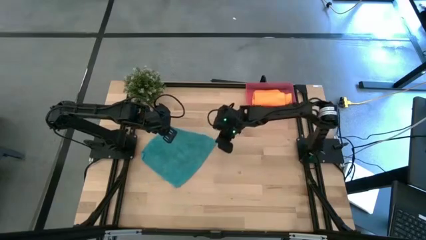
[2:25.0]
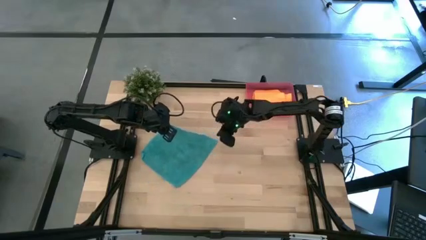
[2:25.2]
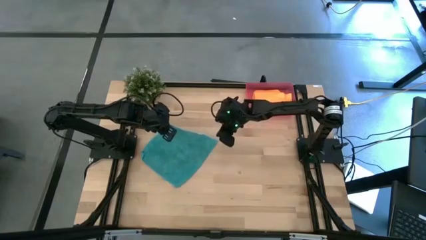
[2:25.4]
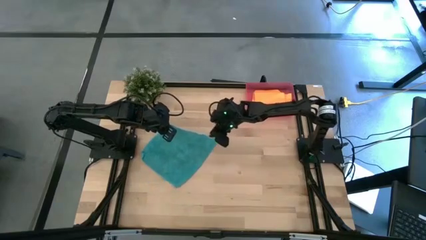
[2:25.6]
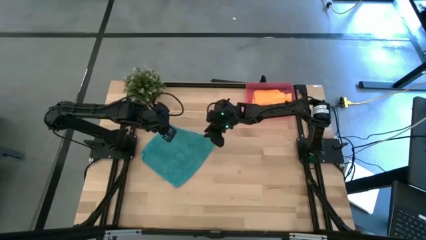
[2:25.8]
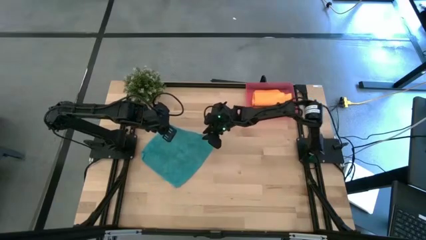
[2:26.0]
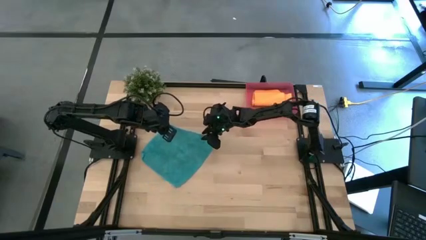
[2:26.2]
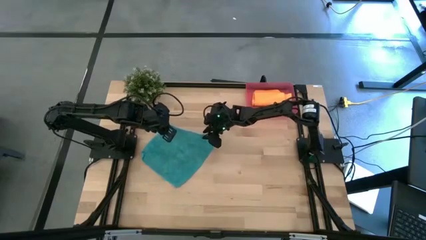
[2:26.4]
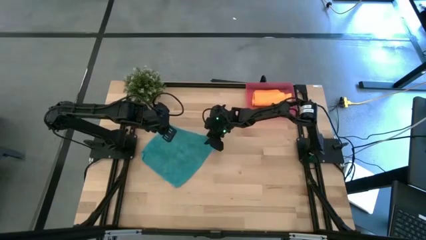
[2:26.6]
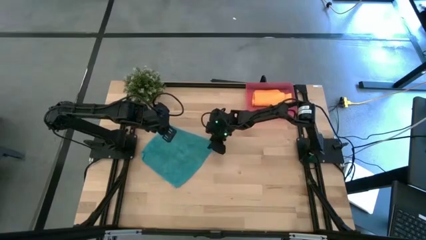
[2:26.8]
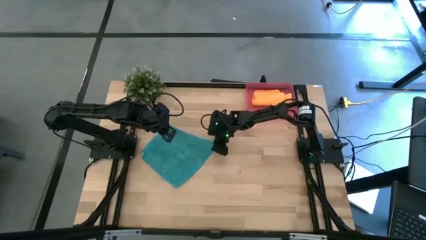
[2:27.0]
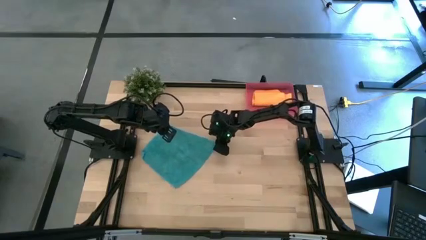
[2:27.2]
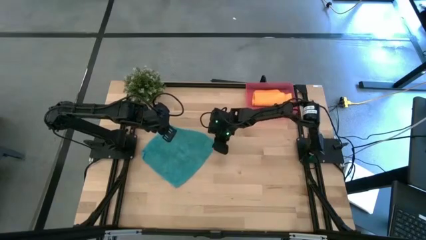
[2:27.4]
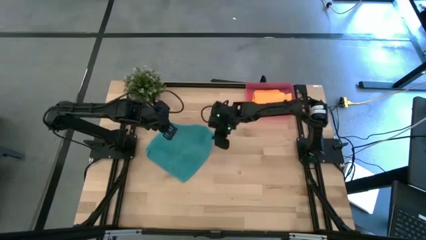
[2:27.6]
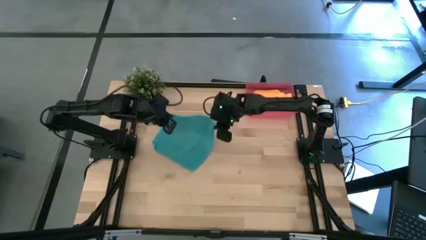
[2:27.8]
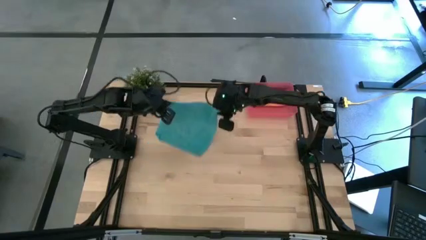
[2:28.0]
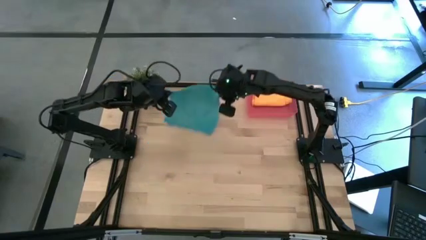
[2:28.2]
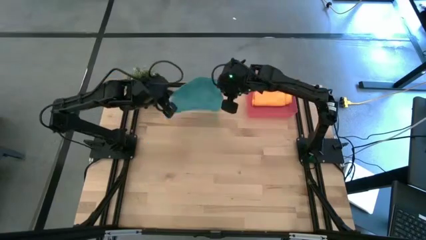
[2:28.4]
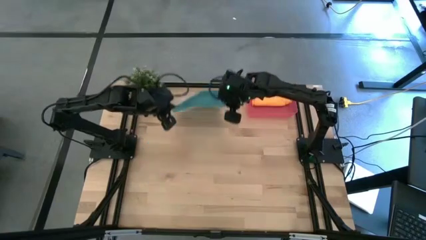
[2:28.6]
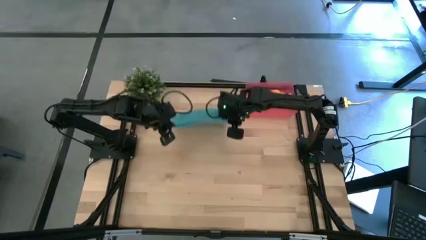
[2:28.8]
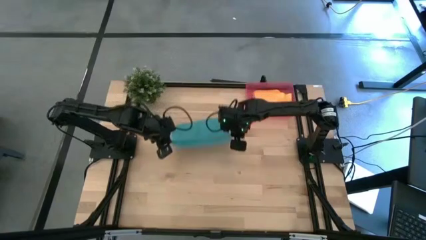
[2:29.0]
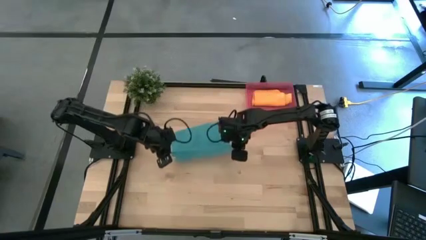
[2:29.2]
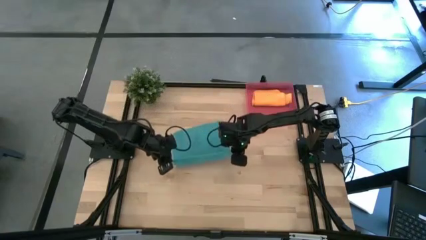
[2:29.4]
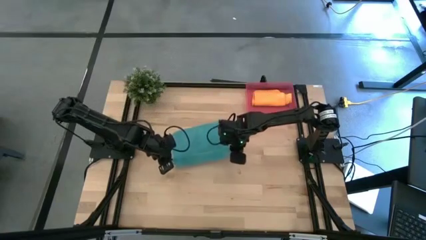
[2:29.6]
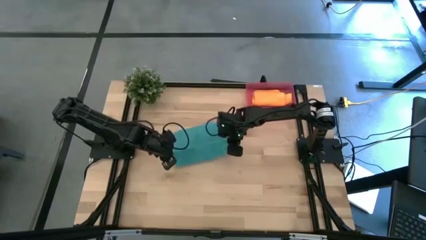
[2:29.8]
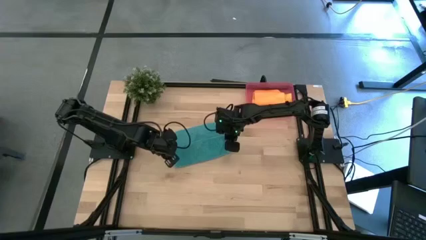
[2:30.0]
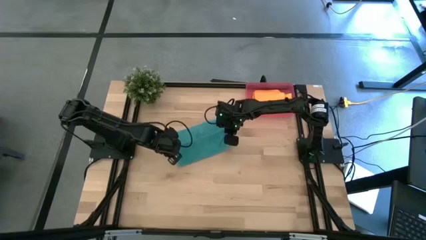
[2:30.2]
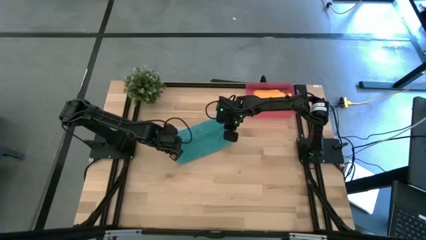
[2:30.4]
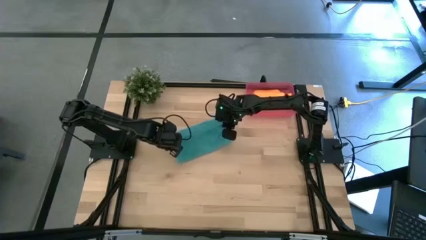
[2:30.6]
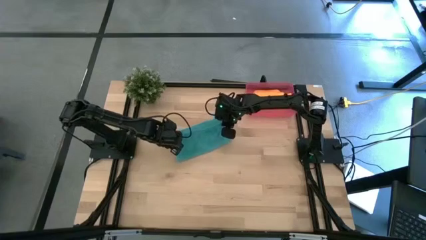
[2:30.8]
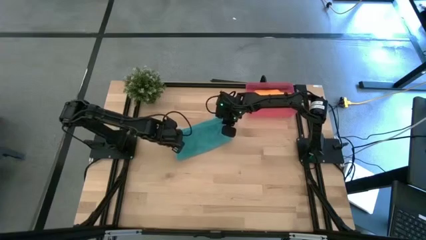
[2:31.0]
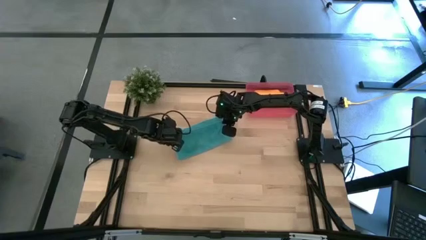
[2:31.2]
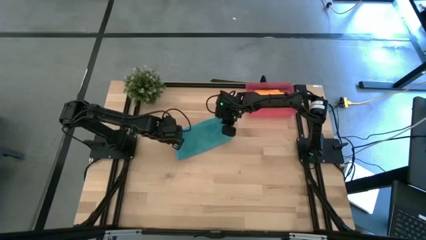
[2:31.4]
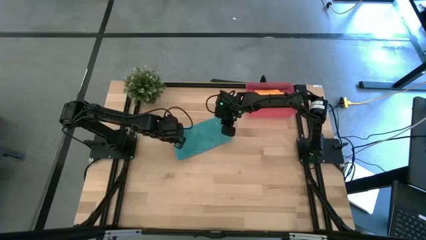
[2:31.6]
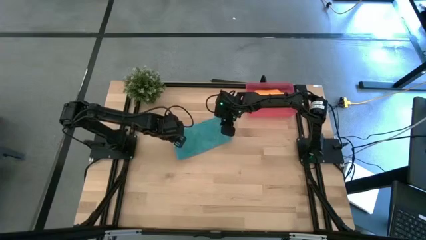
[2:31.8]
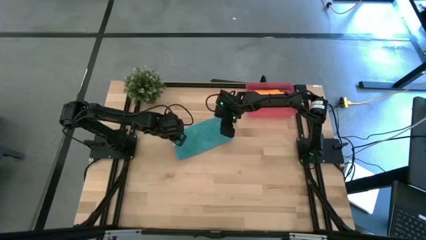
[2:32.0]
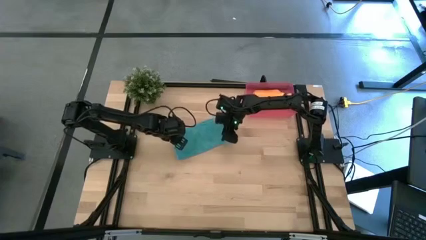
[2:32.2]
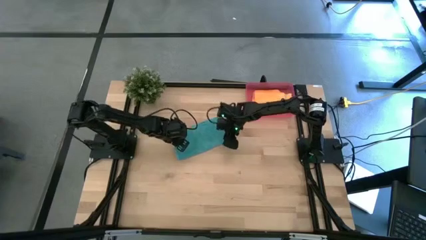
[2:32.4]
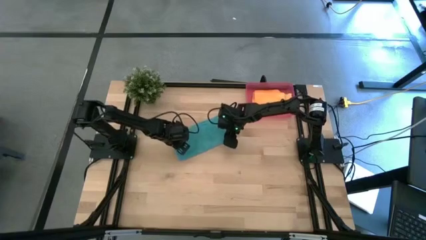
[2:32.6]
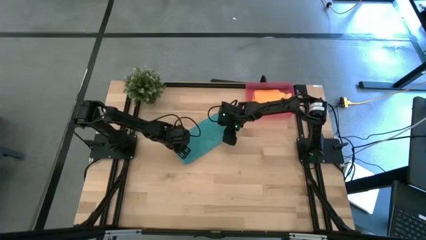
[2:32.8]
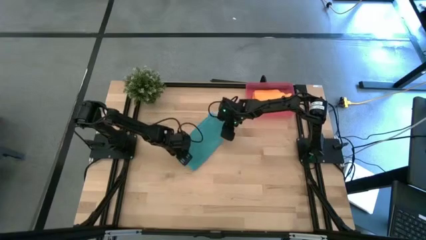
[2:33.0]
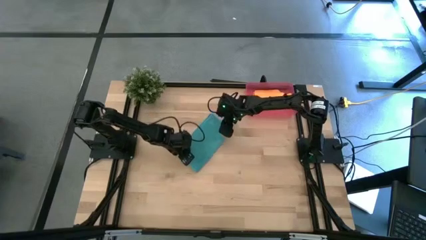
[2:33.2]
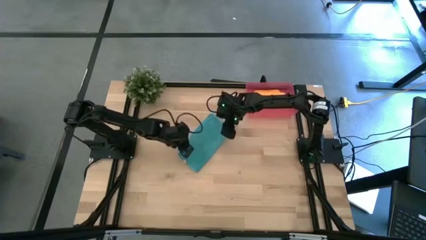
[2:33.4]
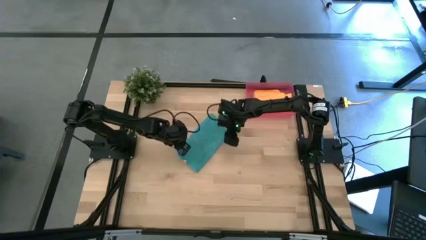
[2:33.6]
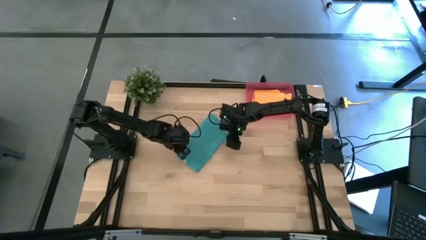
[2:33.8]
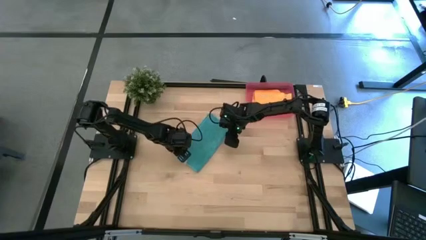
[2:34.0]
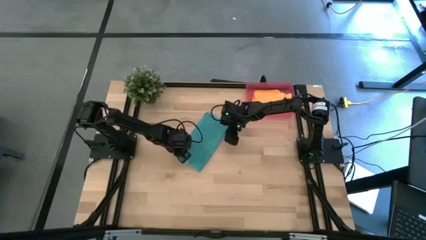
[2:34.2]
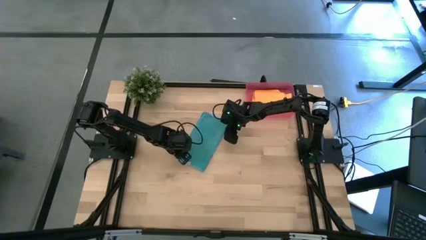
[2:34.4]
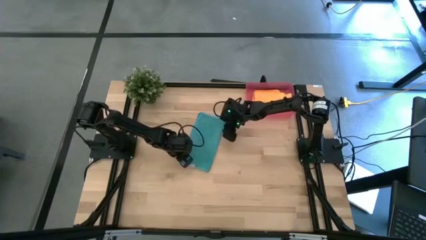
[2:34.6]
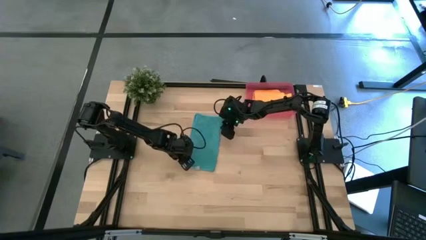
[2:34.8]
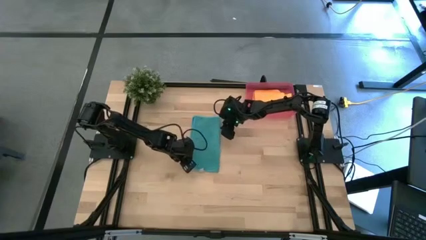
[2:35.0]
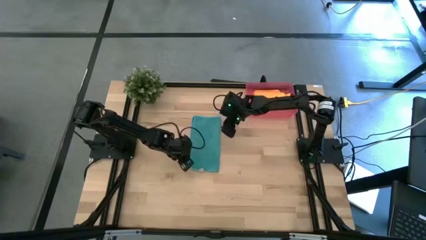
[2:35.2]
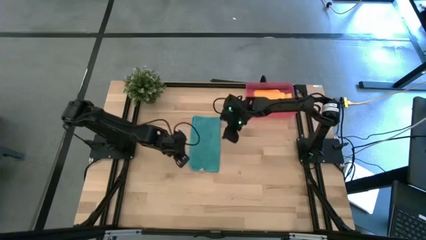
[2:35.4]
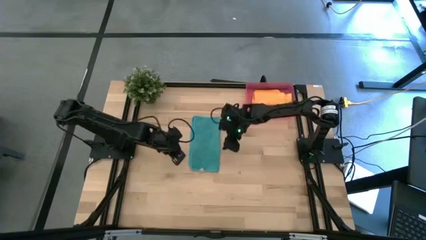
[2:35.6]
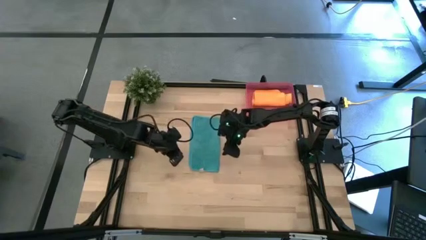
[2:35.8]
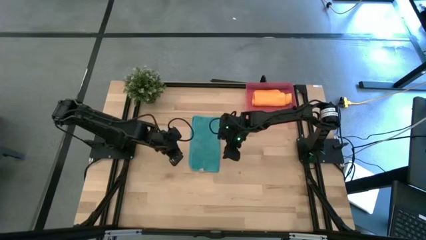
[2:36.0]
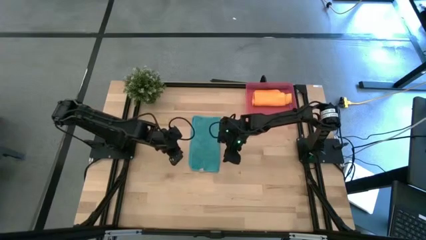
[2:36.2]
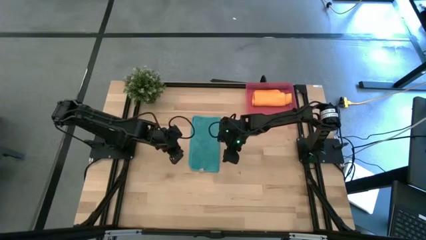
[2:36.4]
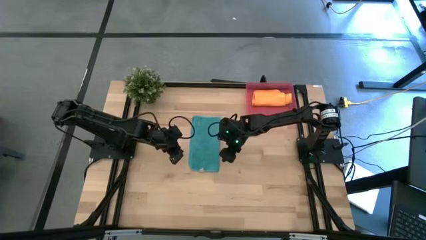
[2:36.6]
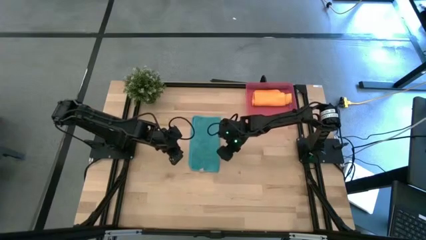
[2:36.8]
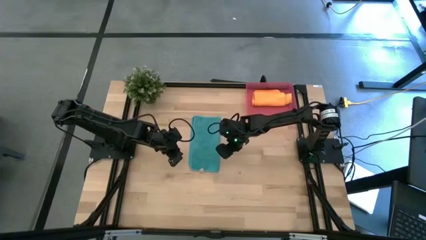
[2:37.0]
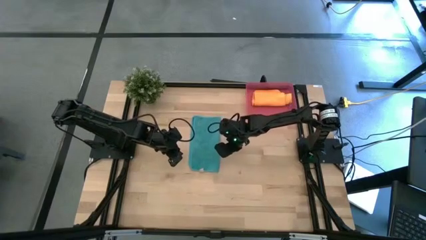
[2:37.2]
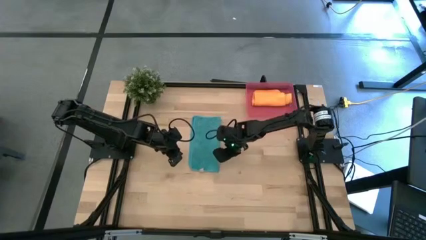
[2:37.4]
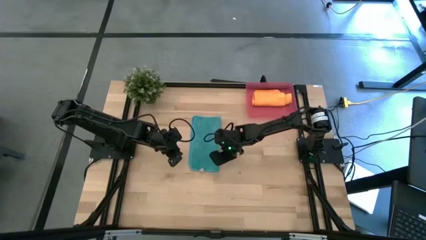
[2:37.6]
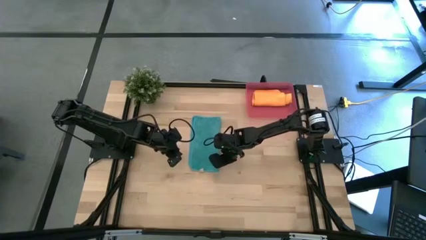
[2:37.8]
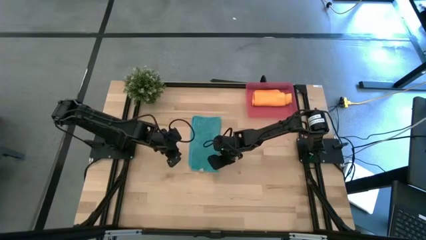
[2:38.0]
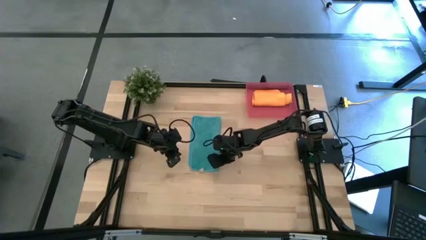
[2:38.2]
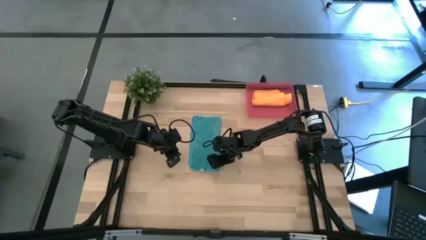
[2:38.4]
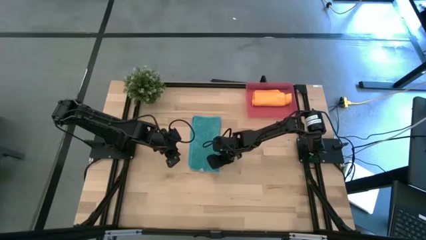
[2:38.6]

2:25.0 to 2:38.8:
Task: Roll microfiber towels into tight, uniform cylinder then place into a basket
Fold the blue microfiber towel
